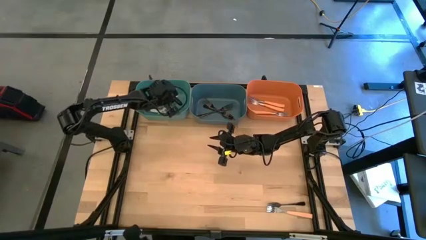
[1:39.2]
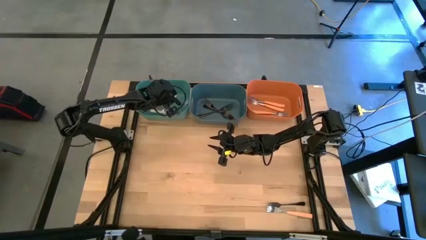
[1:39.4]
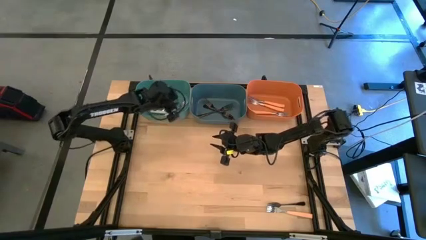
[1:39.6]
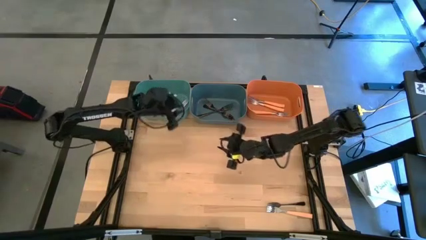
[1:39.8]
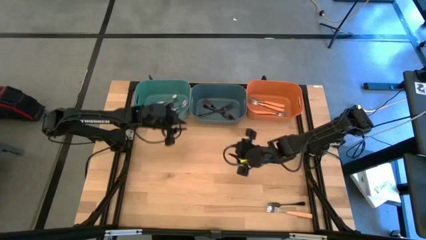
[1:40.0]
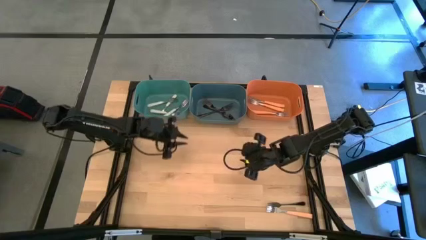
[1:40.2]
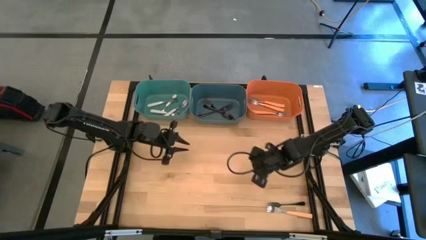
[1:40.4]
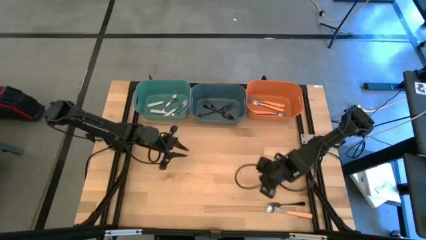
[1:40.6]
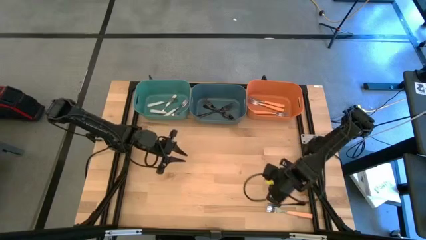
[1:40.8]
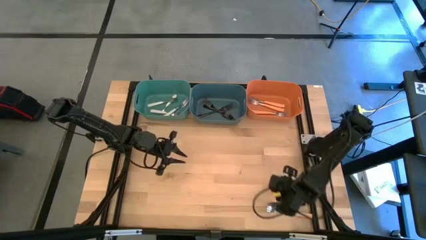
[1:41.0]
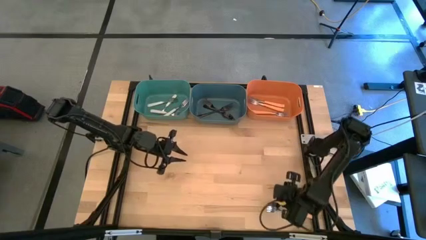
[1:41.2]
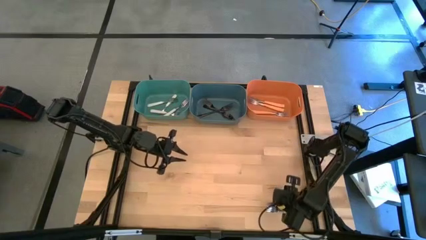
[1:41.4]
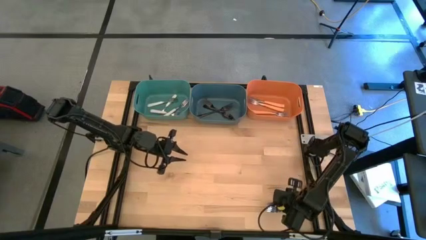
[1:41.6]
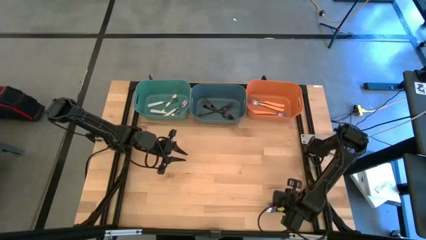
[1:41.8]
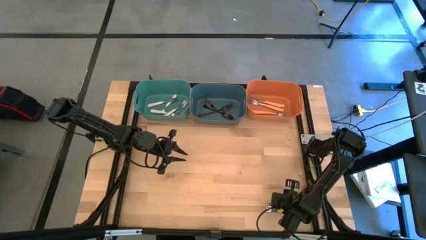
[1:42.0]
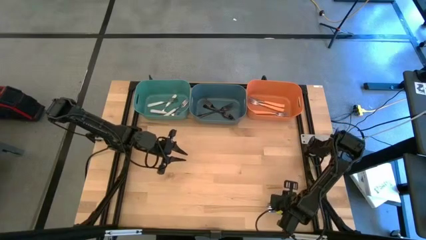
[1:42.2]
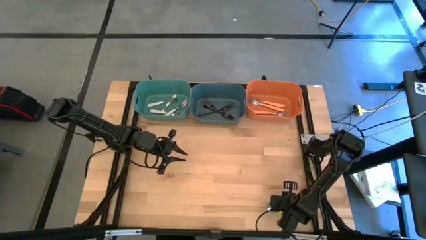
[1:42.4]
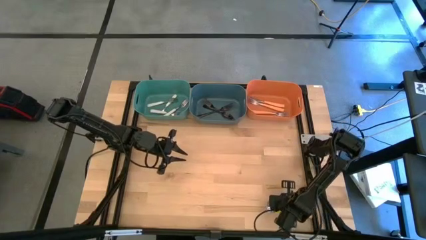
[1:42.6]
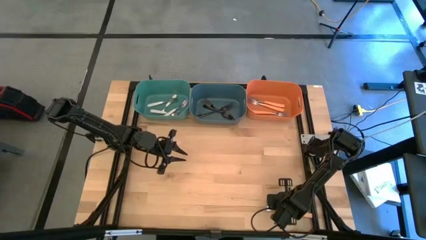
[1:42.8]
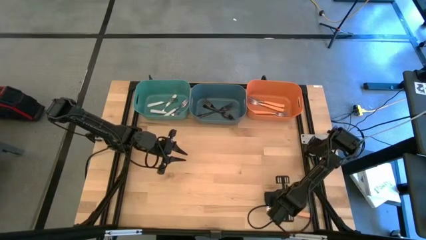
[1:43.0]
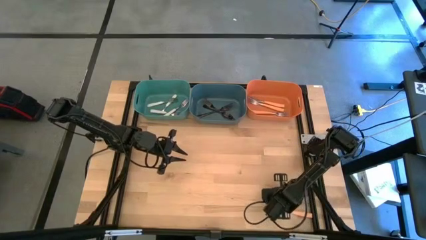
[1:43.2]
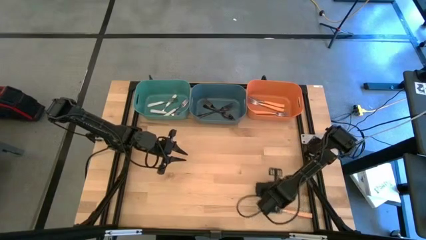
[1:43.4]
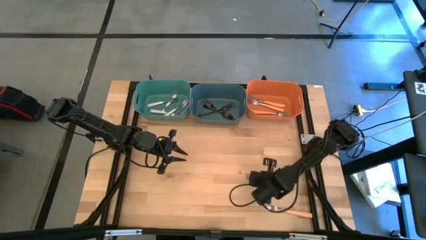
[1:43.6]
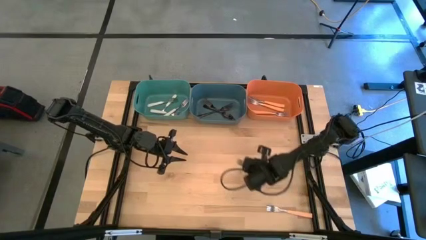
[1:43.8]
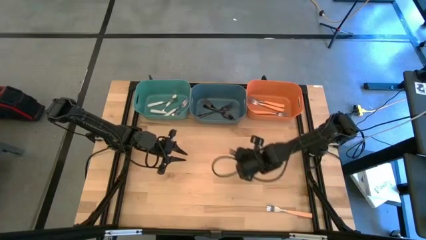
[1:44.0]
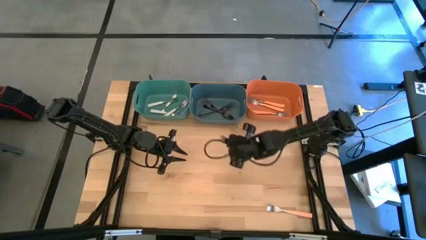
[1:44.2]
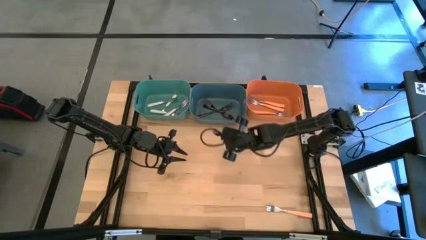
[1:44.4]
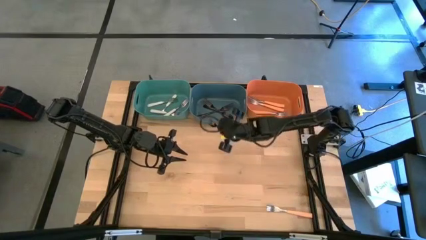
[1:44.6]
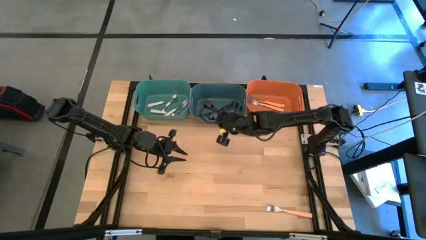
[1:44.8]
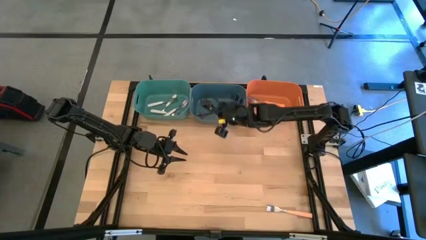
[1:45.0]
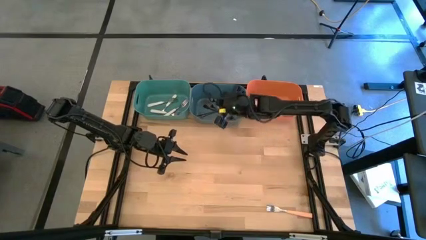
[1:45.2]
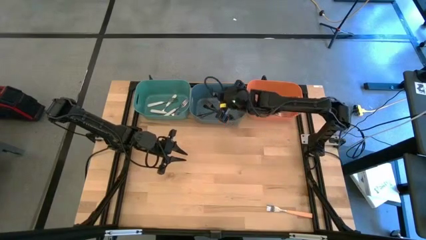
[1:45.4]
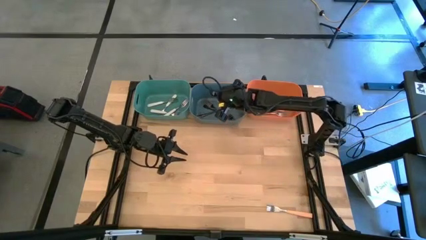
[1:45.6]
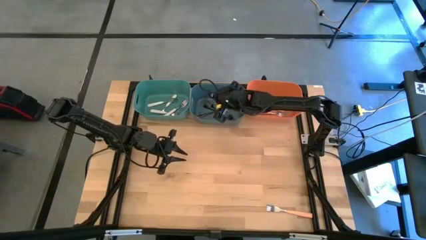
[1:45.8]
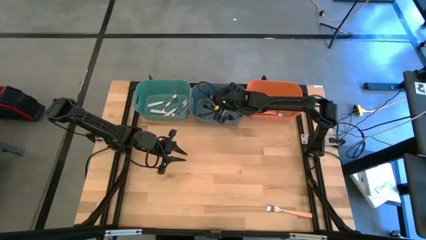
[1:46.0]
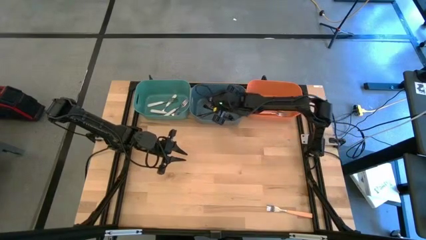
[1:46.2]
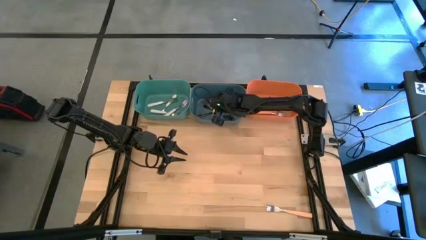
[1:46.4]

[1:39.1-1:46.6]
Task: Sort silverware by color (type)
Put the black fork into the blue bin

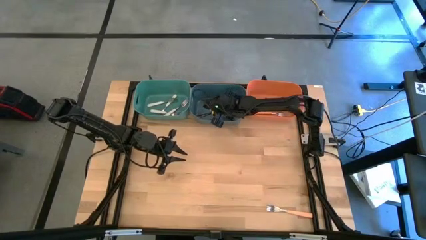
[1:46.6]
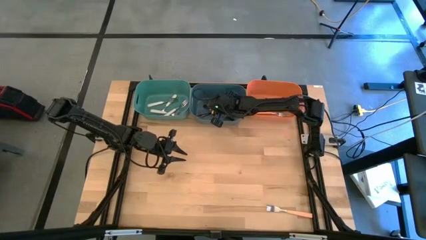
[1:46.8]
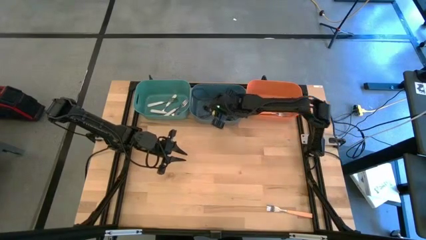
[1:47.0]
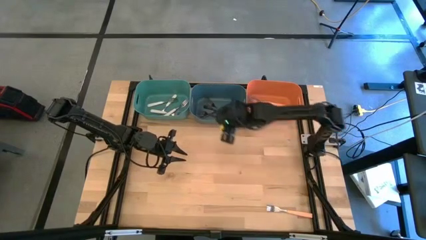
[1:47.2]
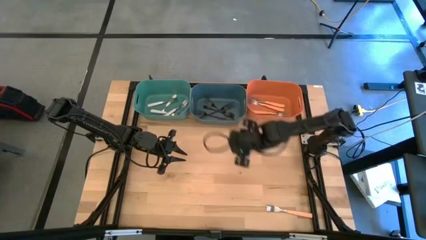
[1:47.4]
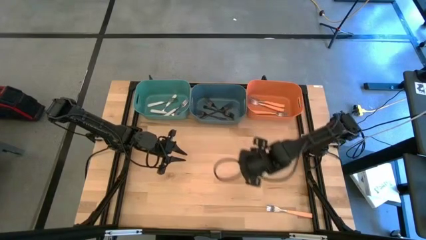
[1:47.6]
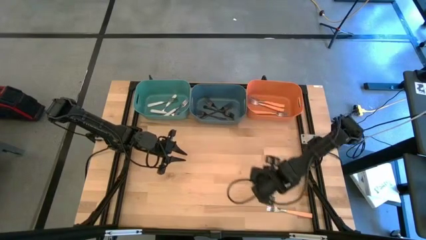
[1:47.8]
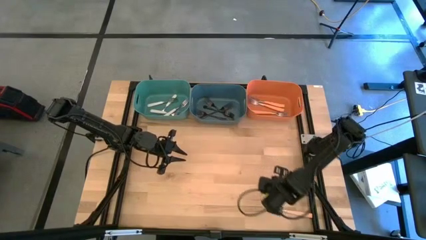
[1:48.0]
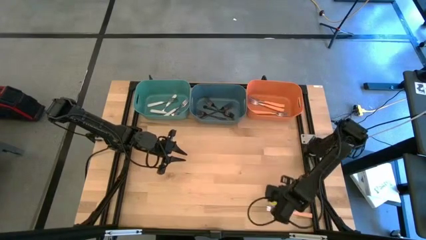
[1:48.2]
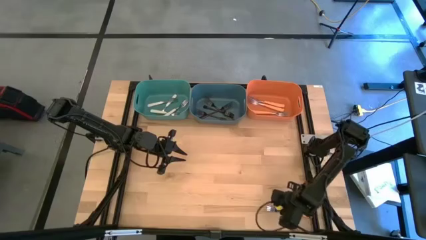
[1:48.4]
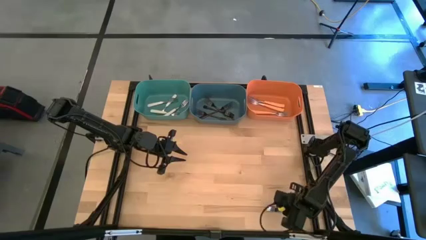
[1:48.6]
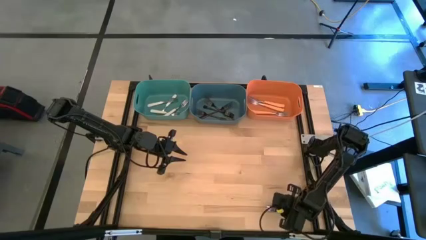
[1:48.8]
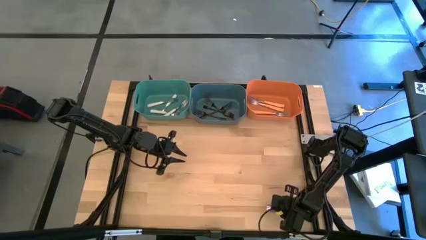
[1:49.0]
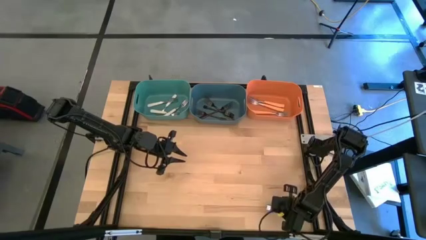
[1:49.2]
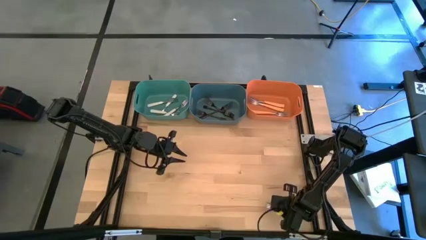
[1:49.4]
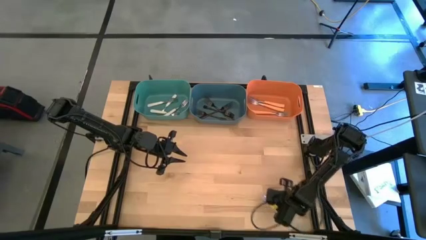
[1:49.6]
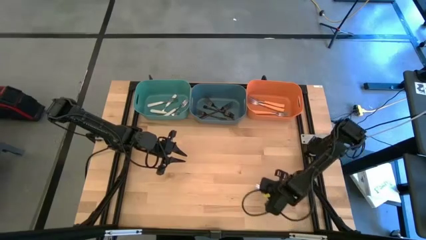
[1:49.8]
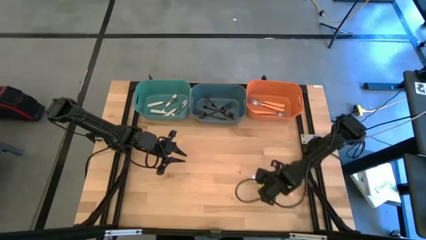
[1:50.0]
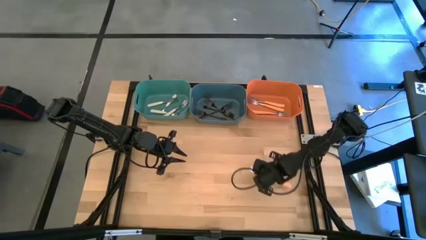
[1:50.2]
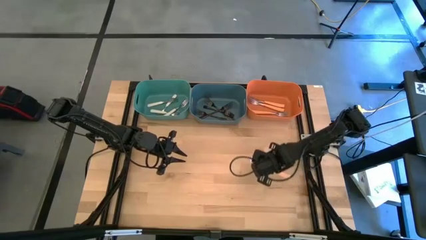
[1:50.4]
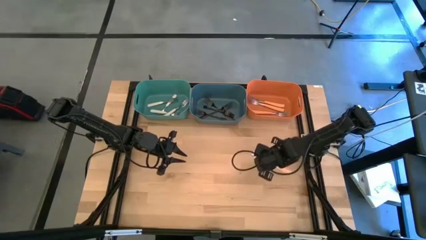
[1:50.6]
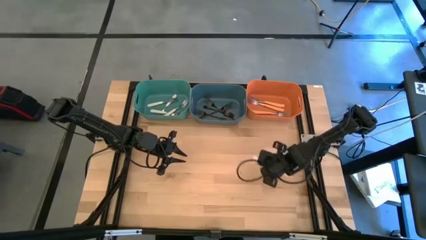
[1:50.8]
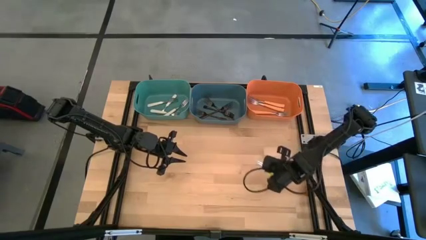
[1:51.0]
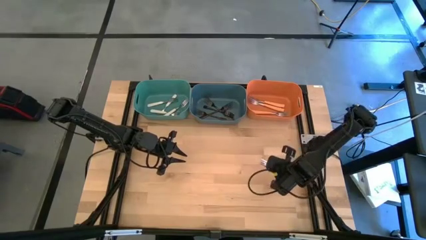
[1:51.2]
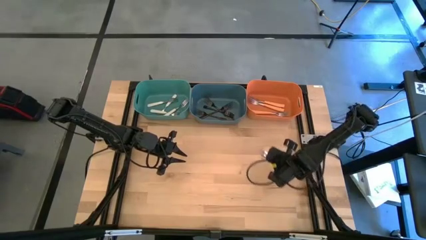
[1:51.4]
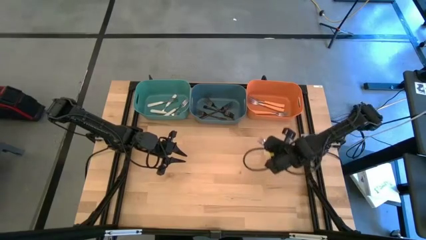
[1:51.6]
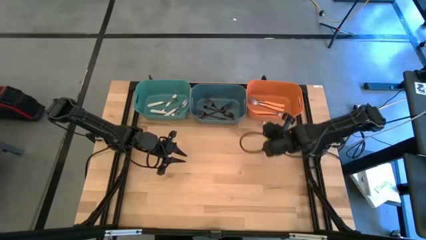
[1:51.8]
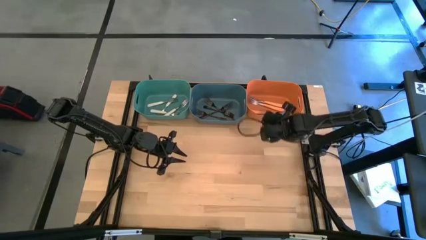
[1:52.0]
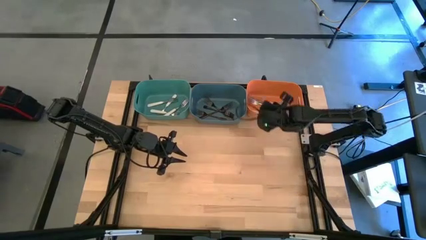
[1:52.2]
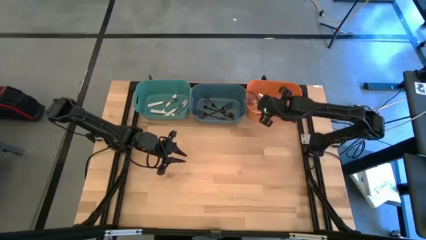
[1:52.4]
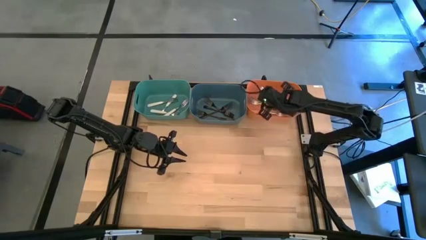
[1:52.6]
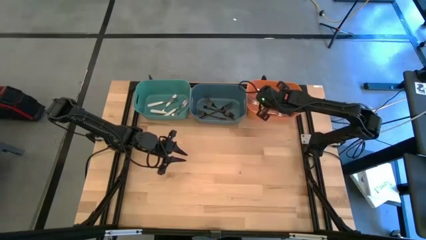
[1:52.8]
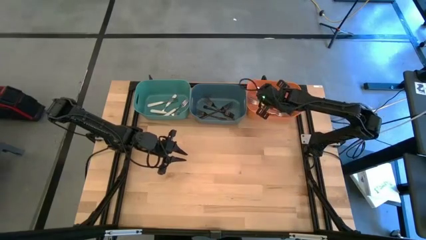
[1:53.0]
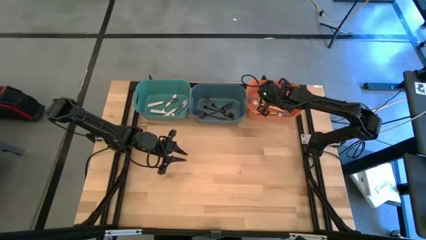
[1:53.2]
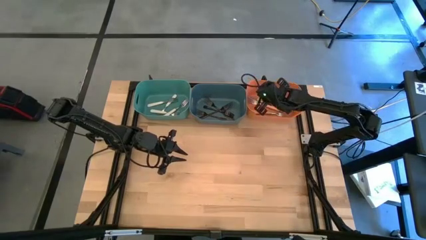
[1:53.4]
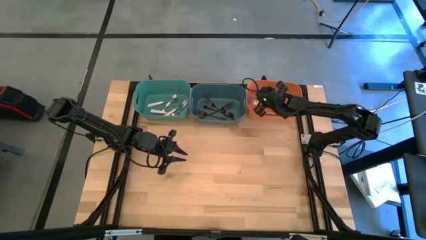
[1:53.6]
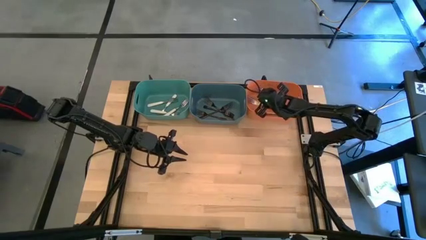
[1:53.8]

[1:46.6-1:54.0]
Put the orange fork into the orange bin
